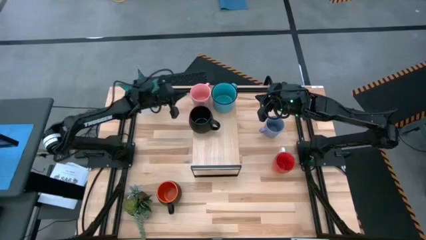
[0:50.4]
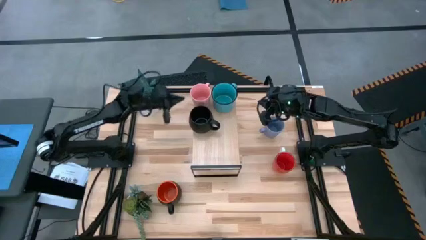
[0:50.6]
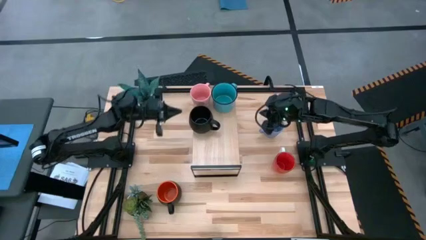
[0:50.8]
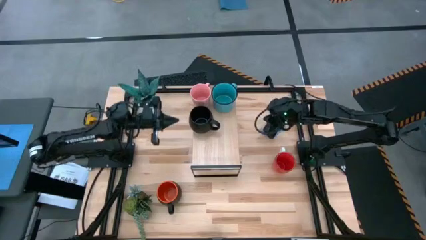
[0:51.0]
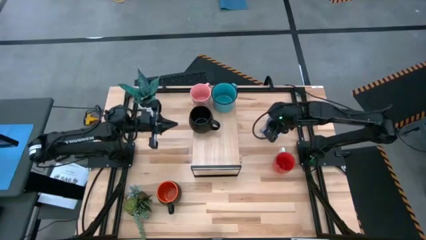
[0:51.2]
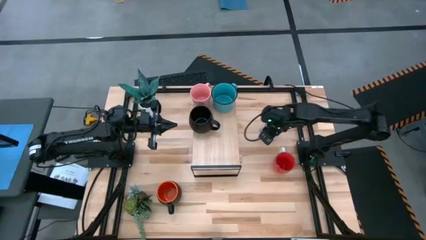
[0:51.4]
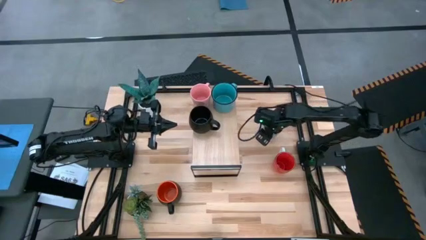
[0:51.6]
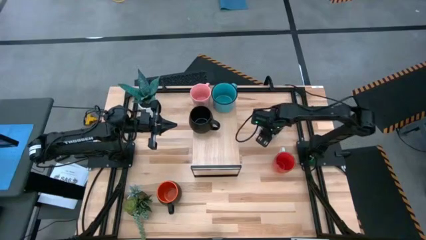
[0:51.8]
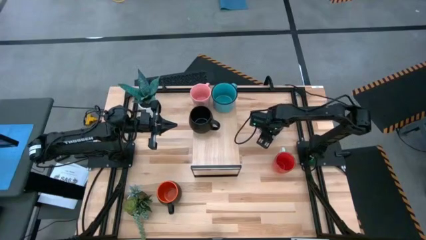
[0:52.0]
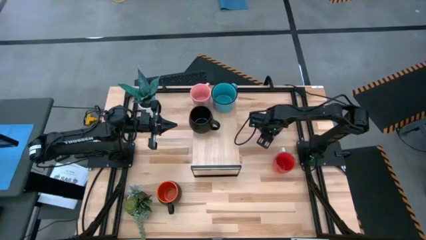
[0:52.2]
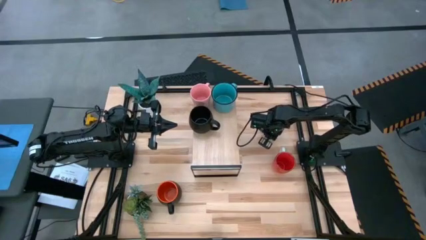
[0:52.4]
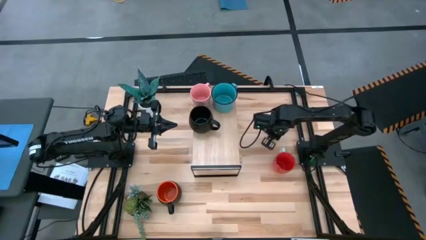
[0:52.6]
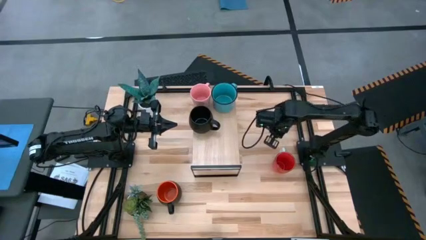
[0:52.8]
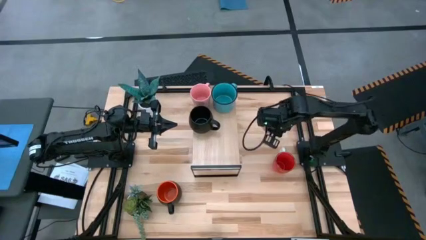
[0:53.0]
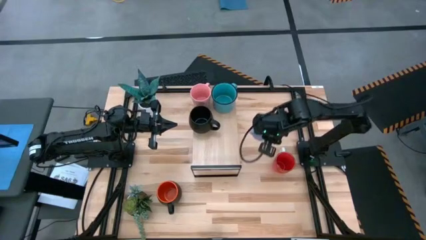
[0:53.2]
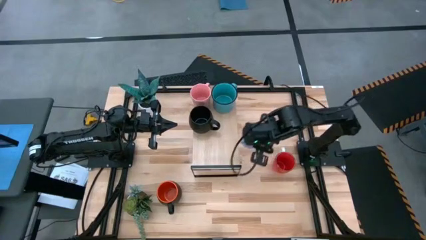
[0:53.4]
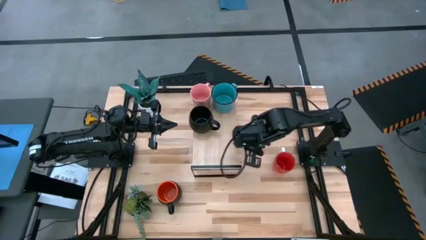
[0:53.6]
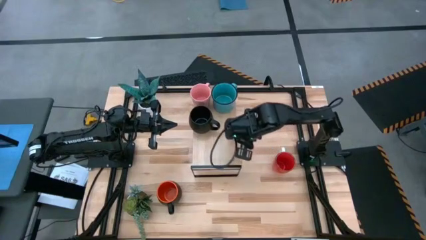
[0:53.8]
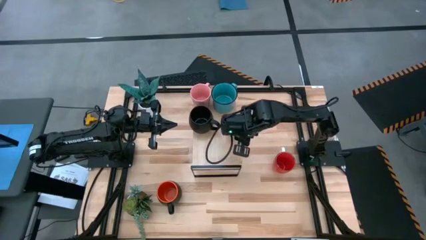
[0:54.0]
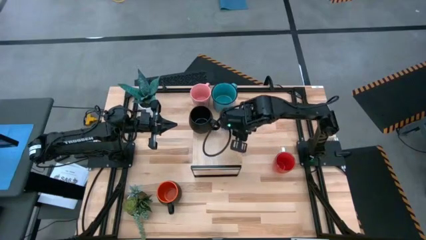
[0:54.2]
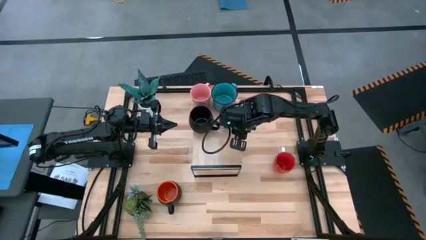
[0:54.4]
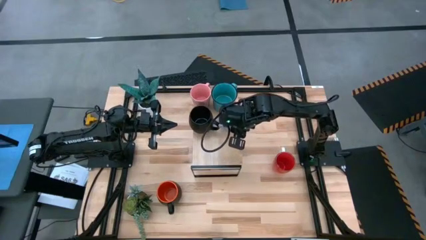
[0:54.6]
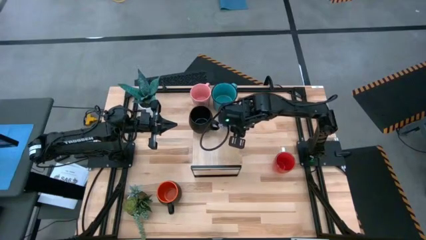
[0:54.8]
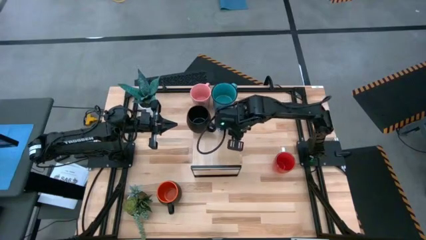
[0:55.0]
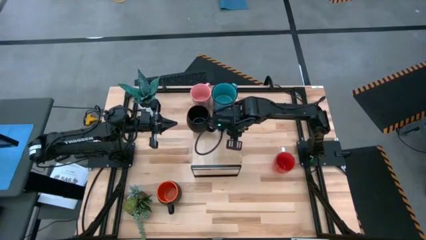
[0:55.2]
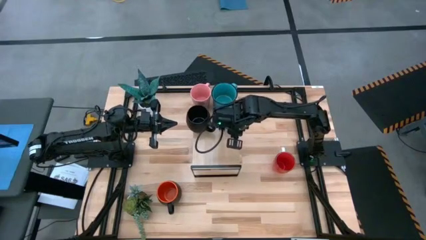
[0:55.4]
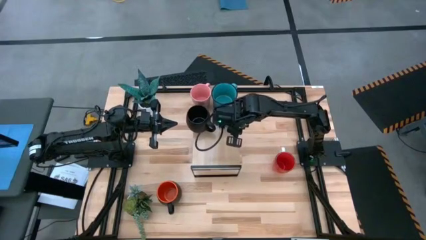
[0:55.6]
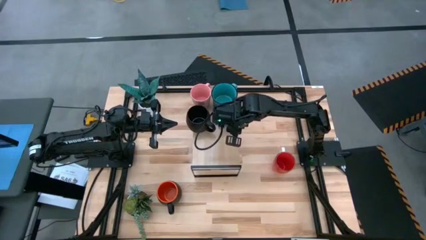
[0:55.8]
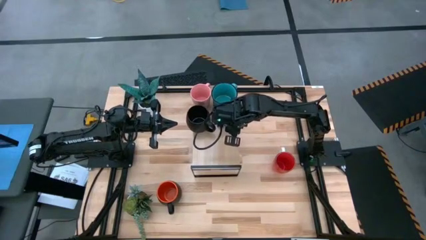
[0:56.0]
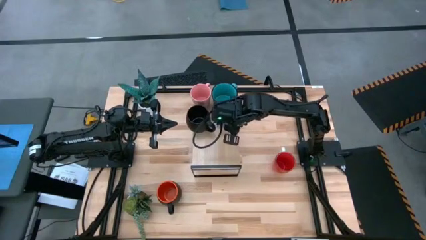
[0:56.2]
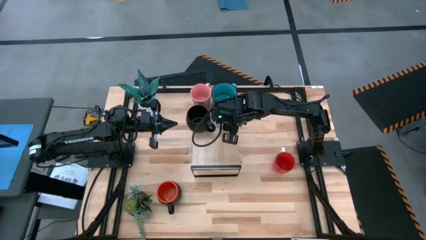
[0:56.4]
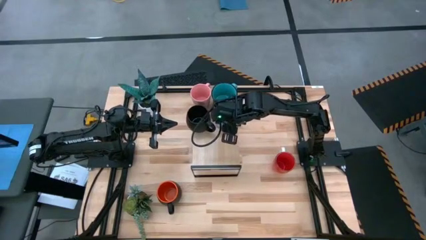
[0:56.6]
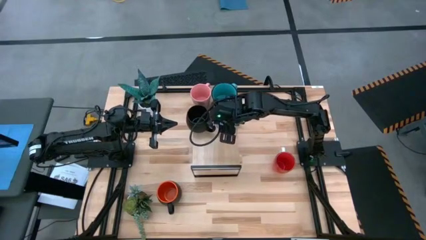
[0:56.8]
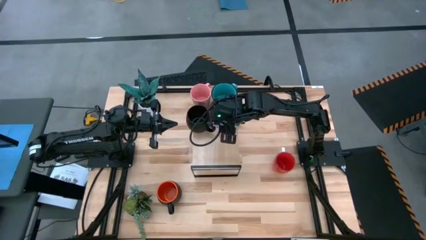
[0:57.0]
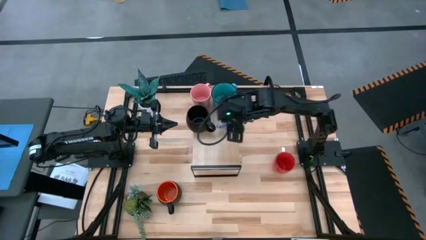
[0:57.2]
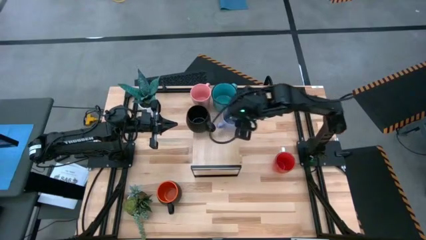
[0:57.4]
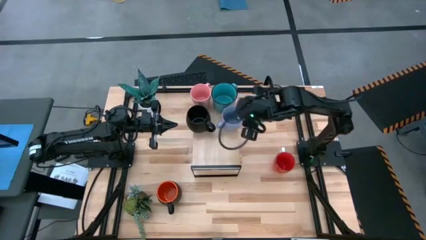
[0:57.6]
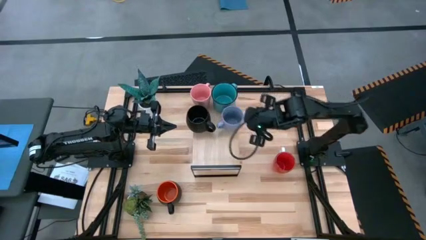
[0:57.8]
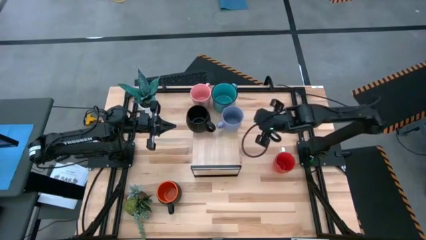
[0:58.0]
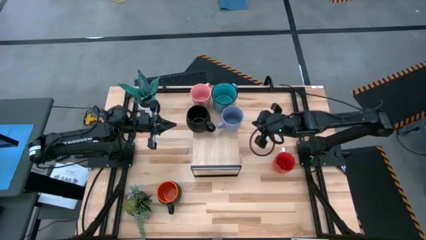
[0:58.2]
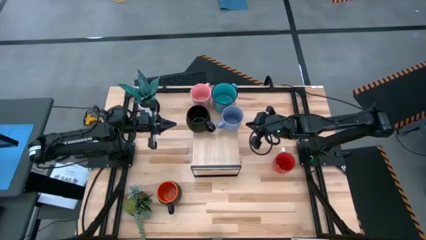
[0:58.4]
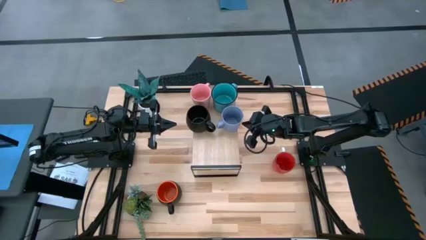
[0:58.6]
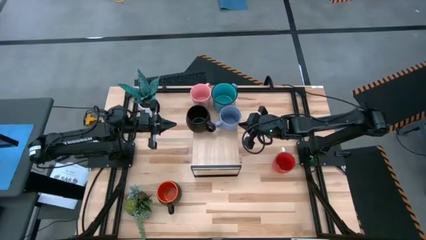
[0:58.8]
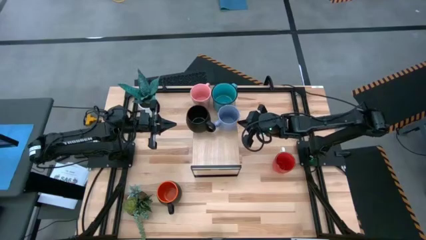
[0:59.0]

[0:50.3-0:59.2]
Task: Place coffee mugs
Put the purple mug on the shelf

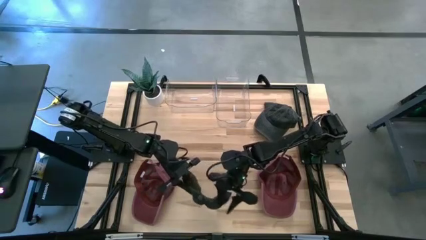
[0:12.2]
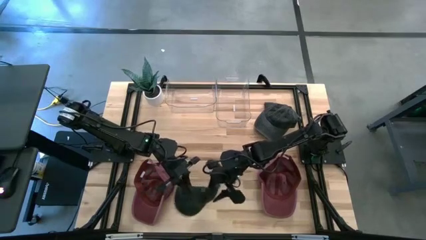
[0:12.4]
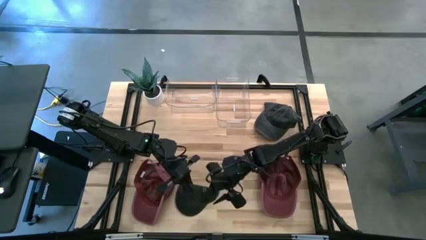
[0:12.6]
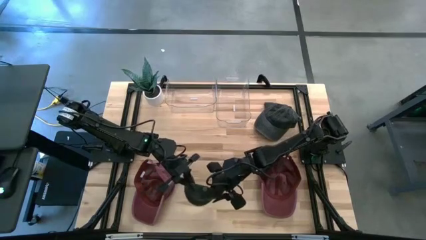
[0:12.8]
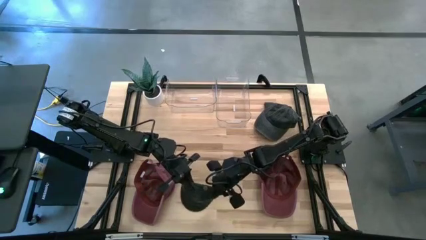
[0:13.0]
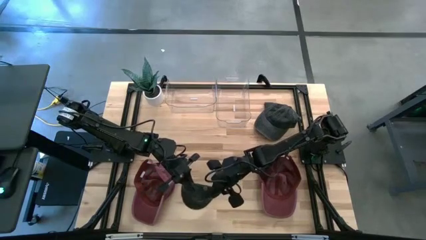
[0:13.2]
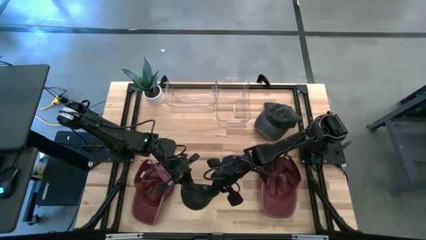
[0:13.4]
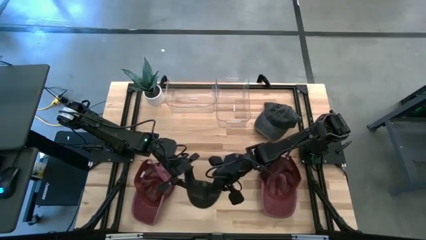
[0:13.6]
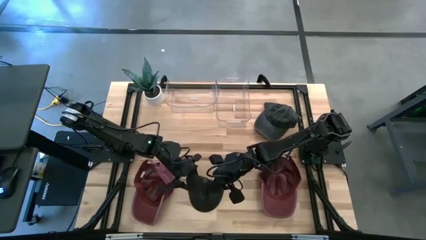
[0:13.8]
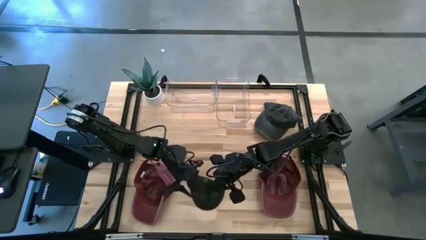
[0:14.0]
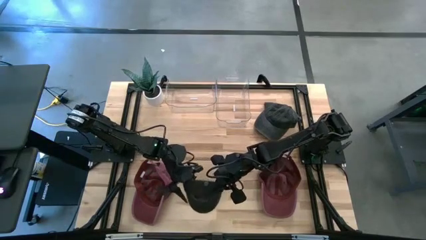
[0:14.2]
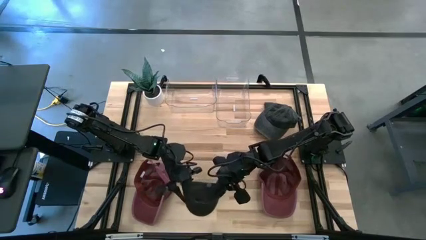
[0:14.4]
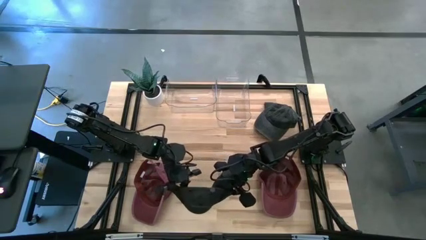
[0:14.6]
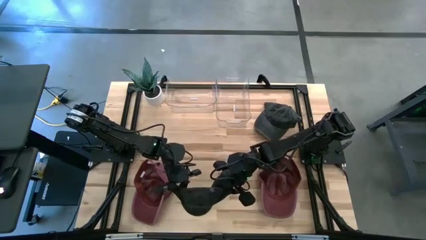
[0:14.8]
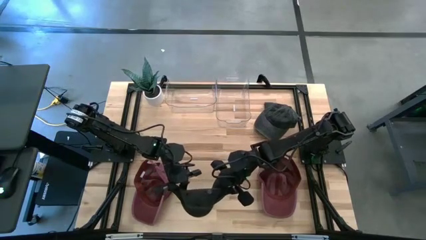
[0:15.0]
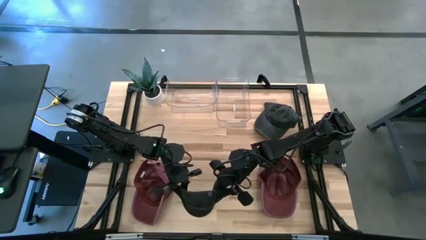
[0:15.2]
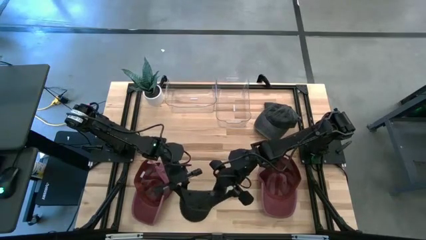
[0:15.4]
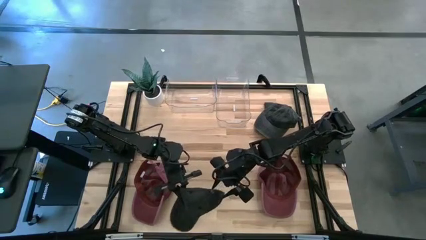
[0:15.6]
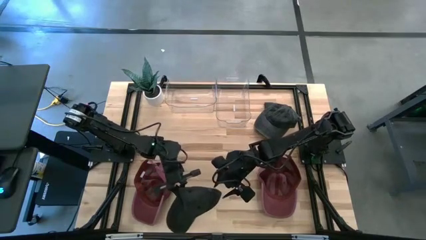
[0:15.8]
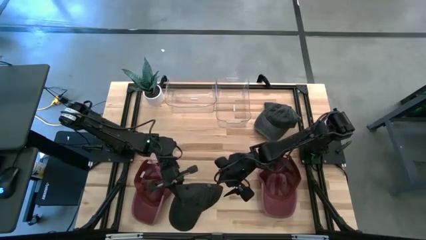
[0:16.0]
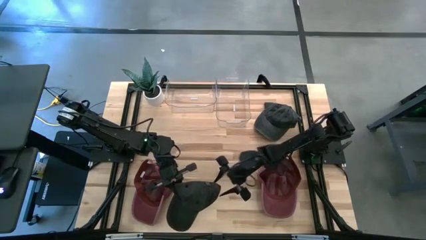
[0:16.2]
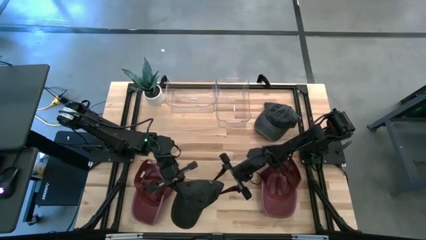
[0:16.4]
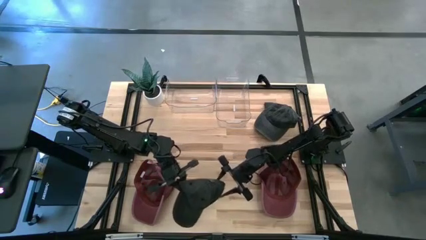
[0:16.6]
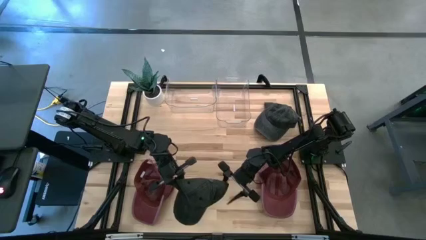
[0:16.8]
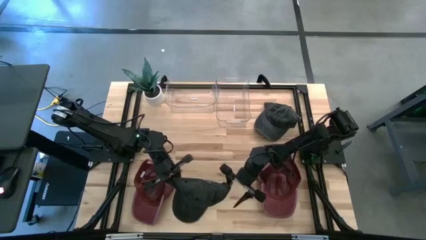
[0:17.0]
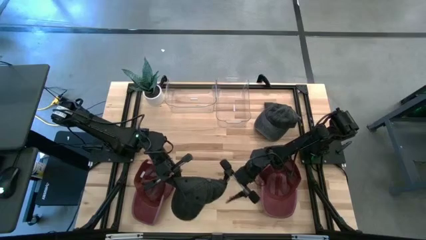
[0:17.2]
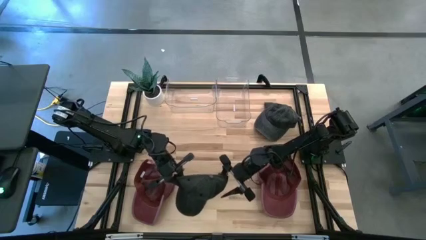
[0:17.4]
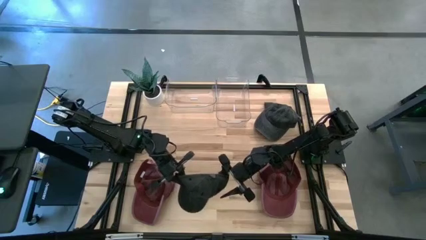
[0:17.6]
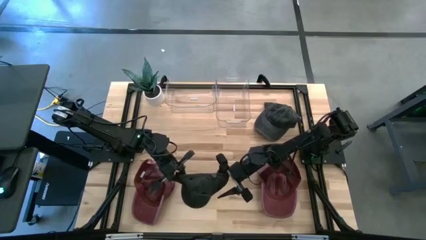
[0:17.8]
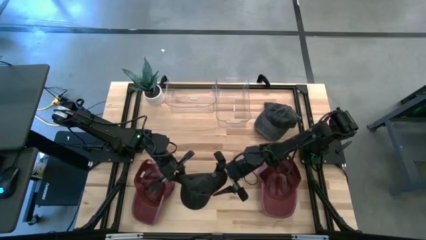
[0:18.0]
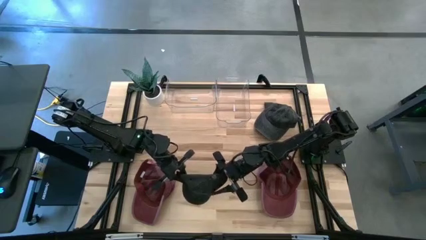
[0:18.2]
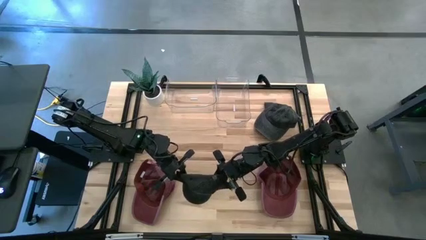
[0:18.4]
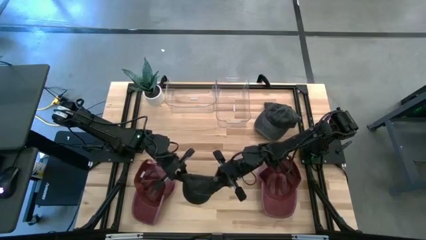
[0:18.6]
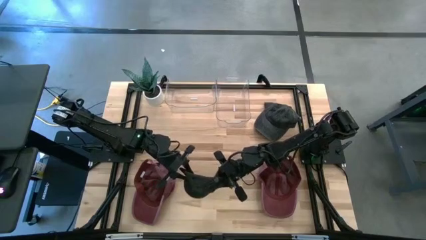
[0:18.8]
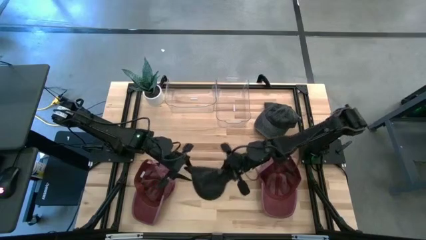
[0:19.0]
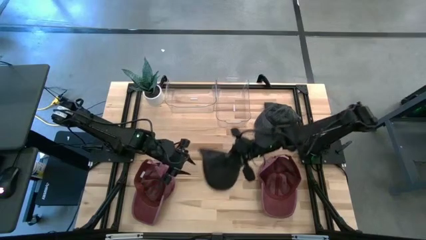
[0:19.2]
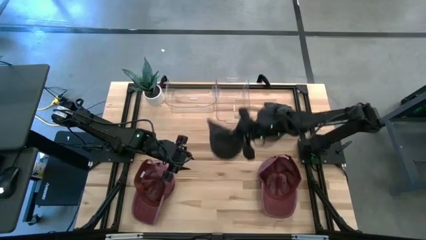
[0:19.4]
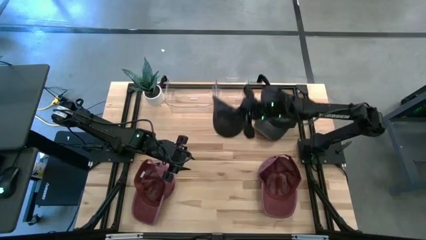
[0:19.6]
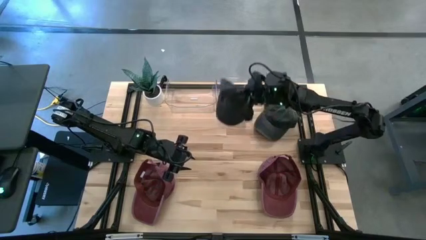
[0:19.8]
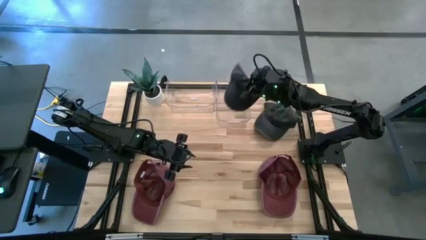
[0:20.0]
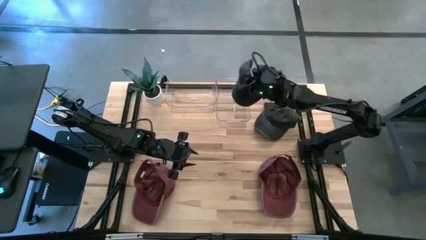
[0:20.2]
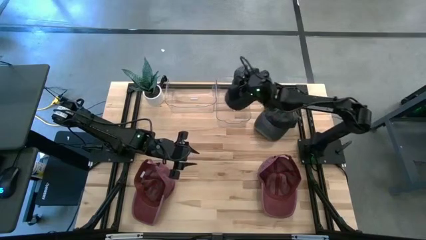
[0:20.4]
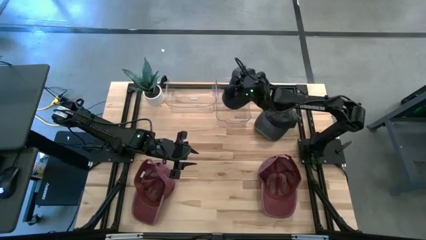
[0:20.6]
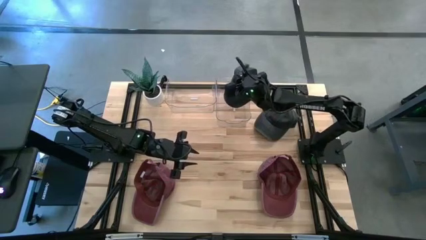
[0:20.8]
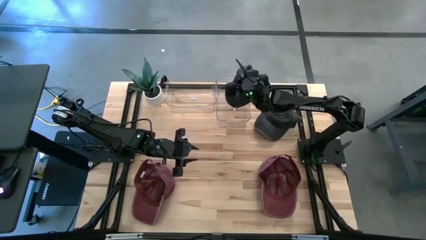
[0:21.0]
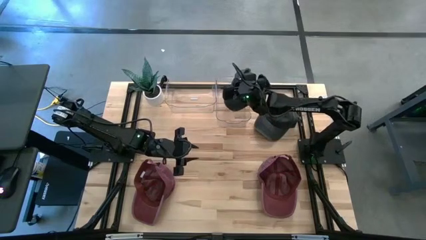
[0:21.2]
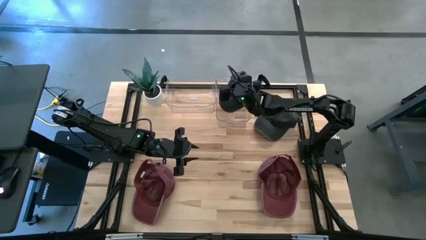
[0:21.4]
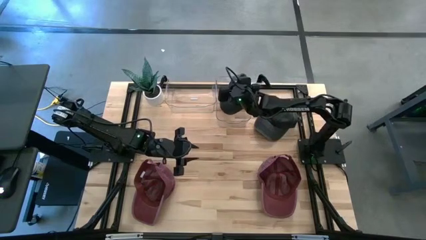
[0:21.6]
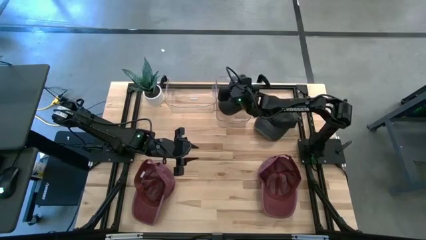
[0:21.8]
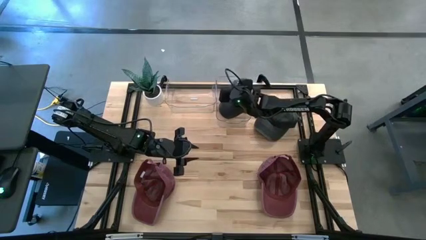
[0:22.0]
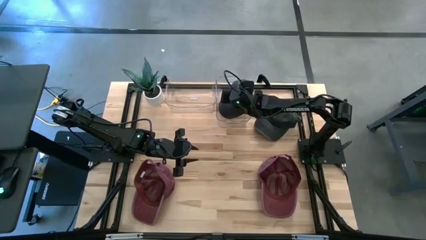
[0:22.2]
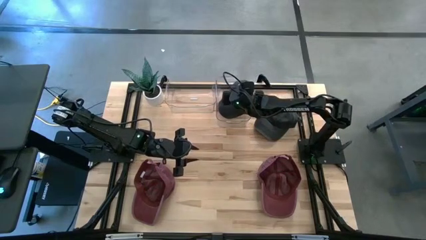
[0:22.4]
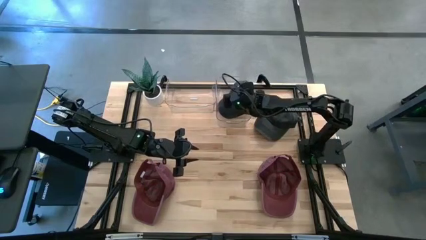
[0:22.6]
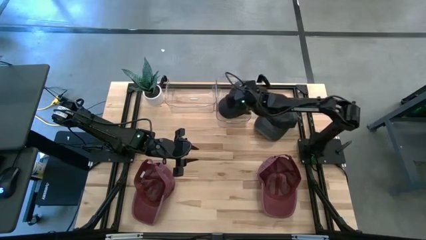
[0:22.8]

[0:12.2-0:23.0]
Task: Pick & Place hat
Put the bottom black cap into the right transparent bin
